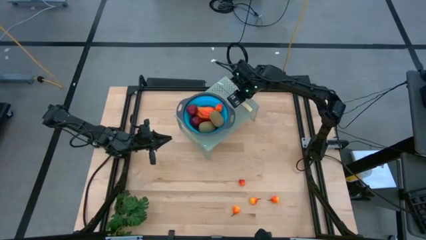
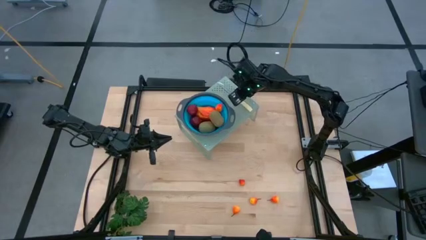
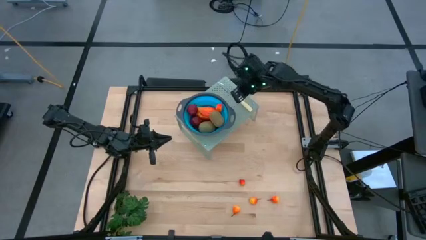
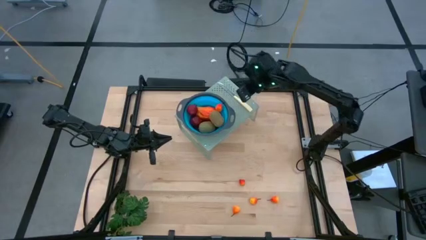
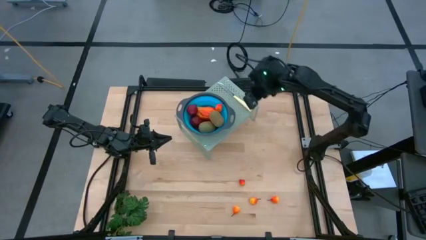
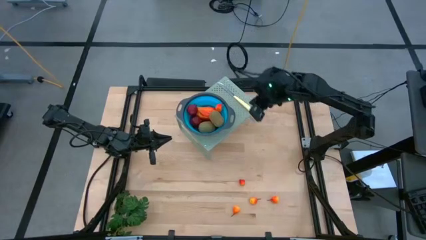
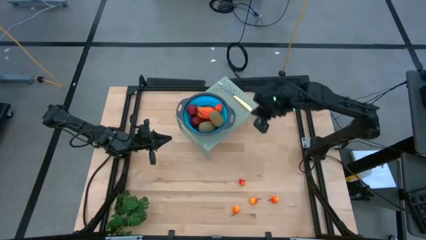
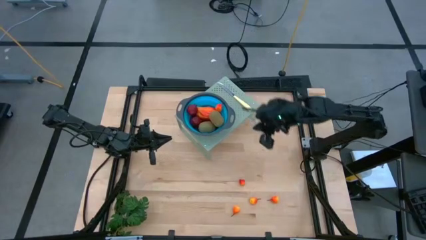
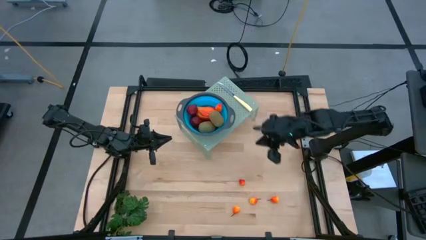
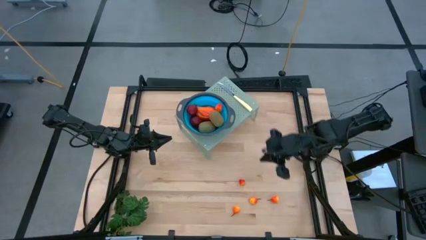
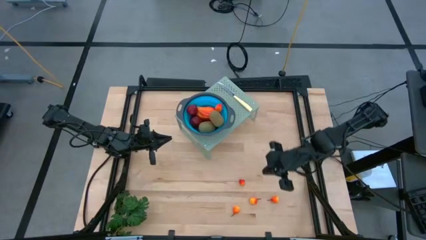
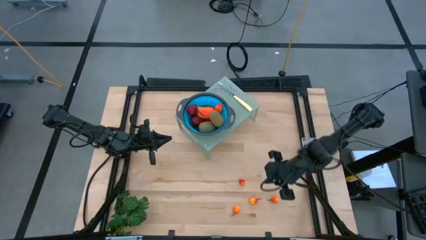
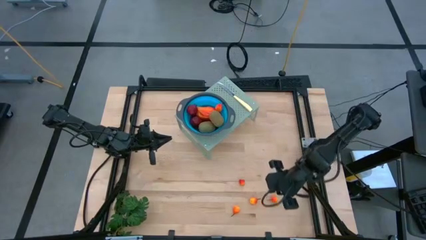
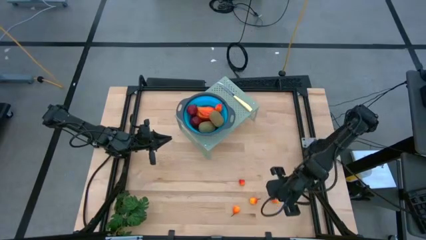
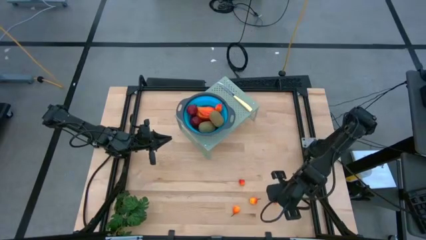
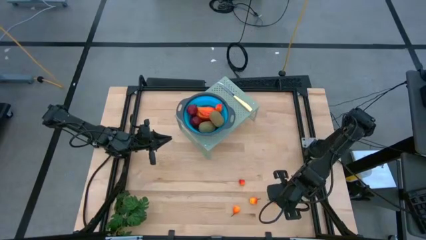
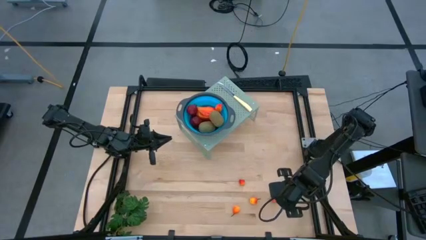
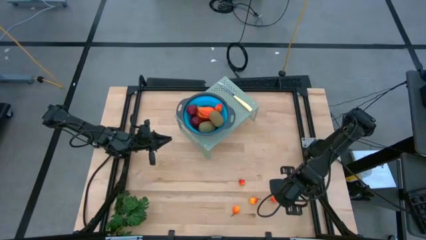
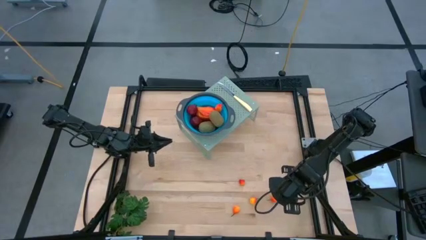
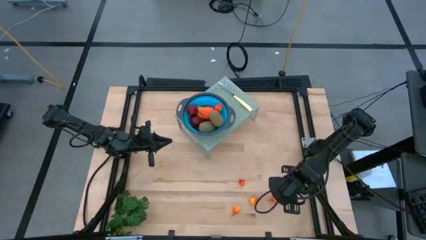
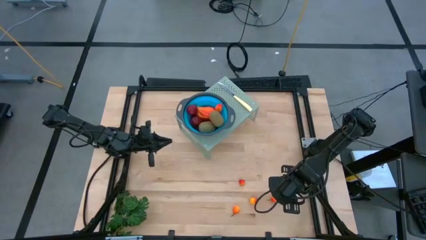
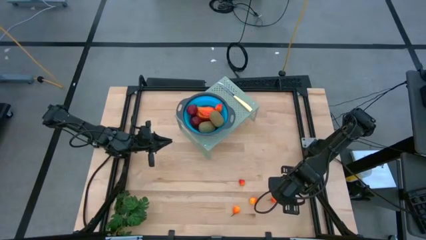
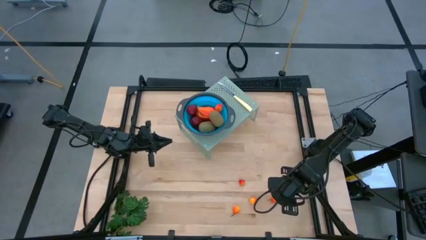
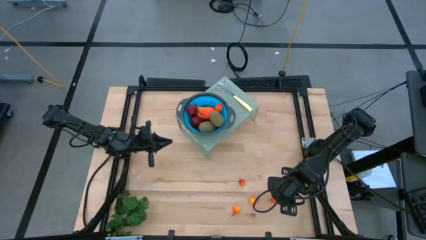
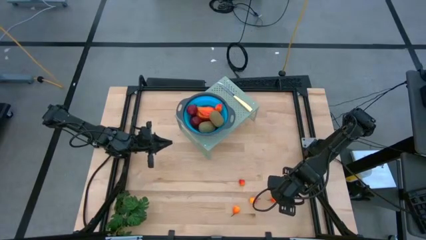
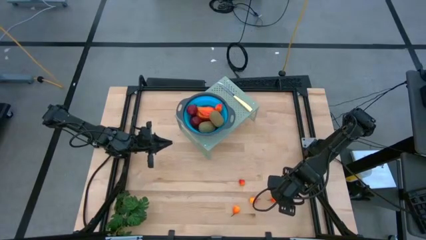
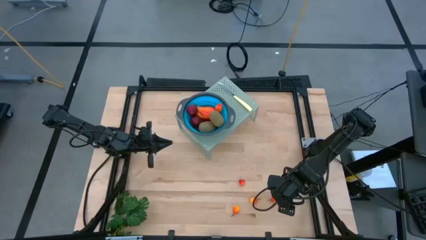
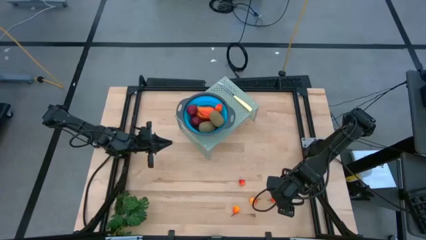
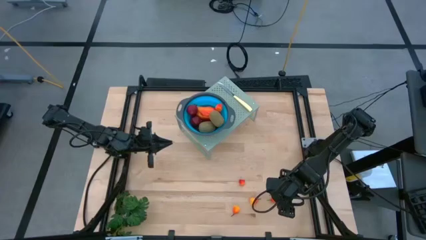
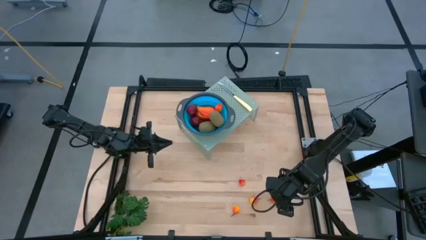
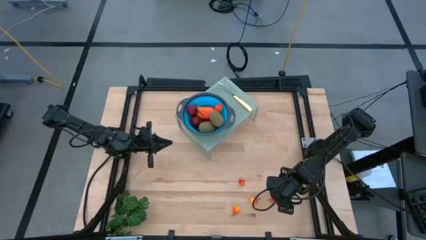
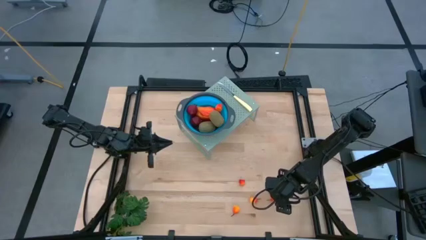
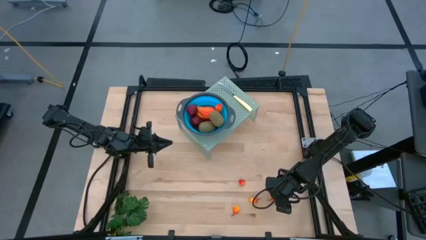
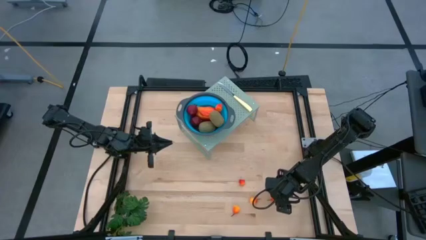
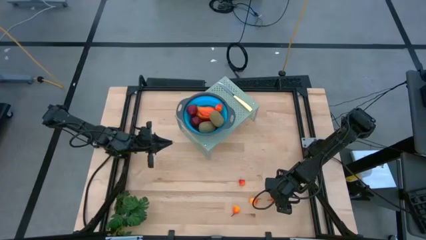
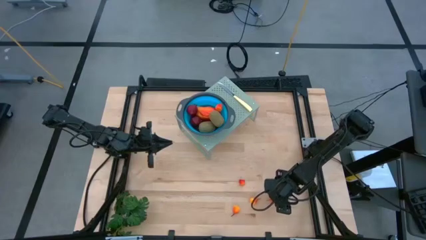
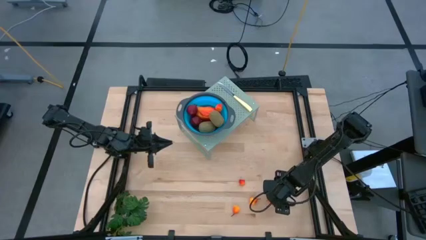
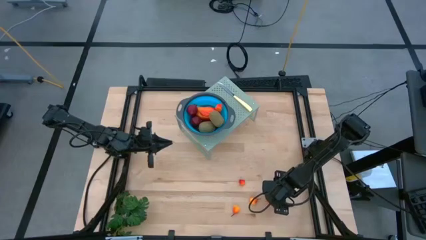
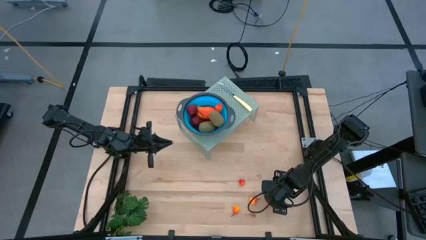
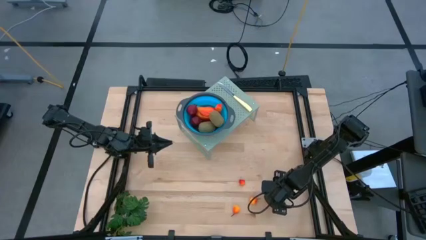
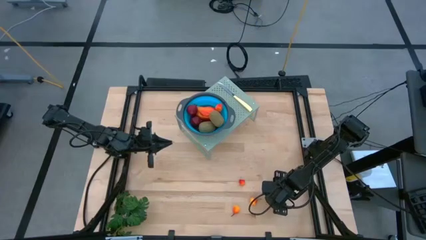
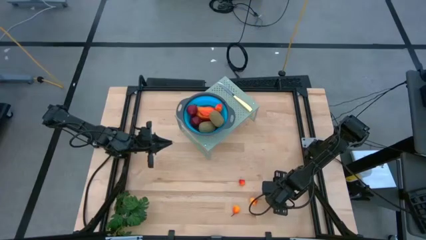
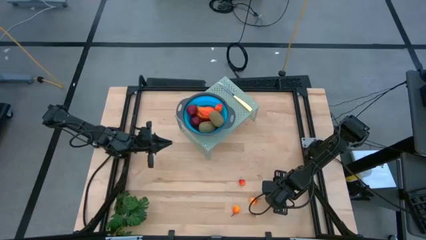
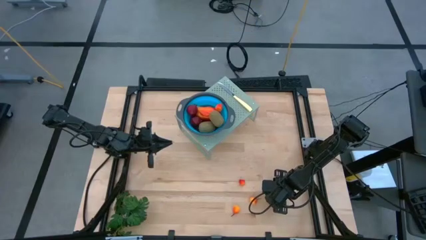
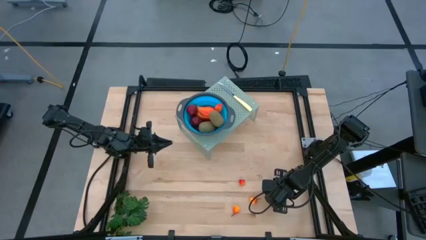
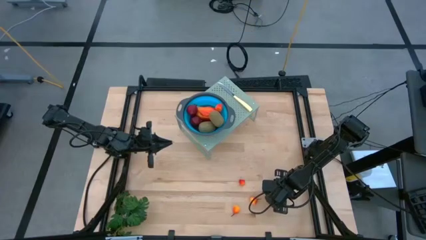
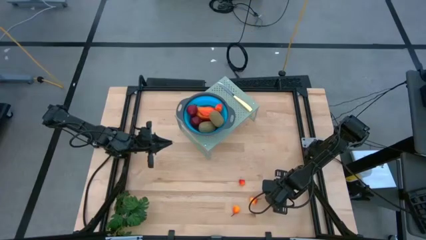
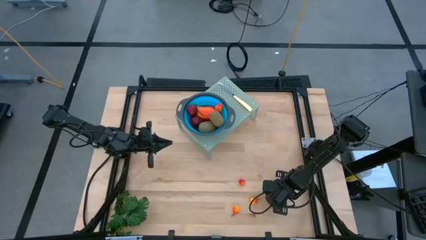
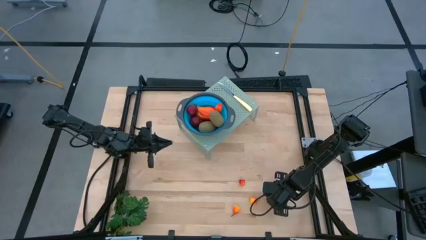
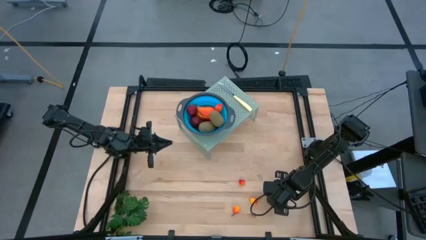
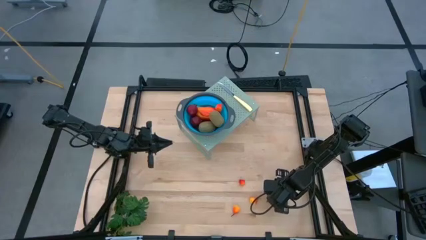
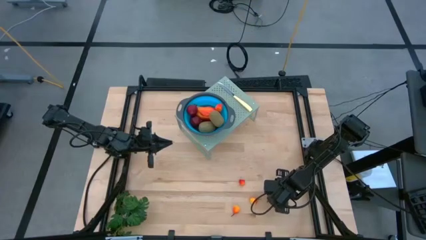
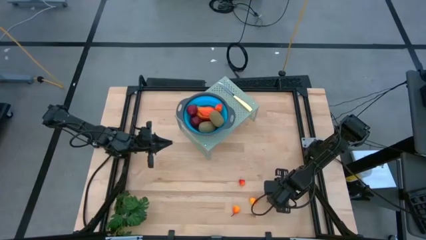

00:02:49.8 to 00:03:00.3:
Task: Pick & Place Fruit
Put the peach into the collapsible colander on the shelf
